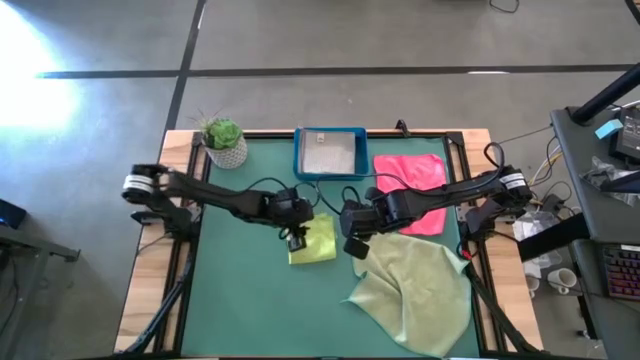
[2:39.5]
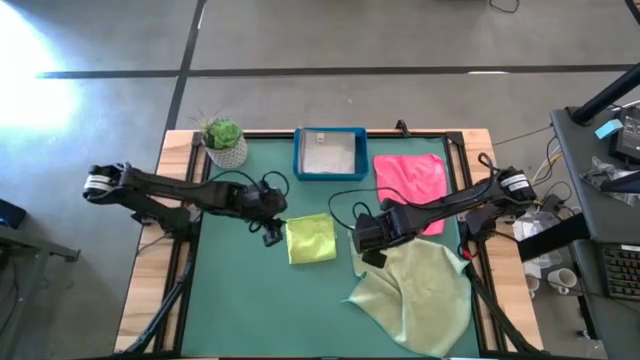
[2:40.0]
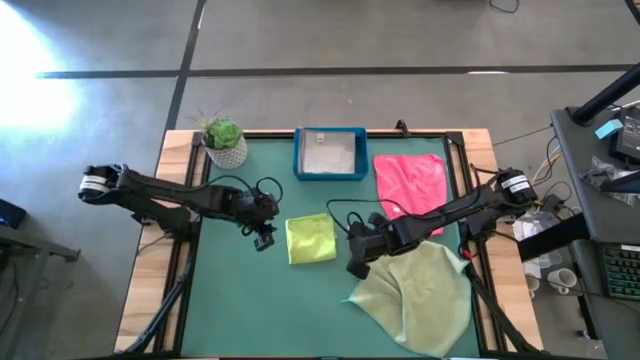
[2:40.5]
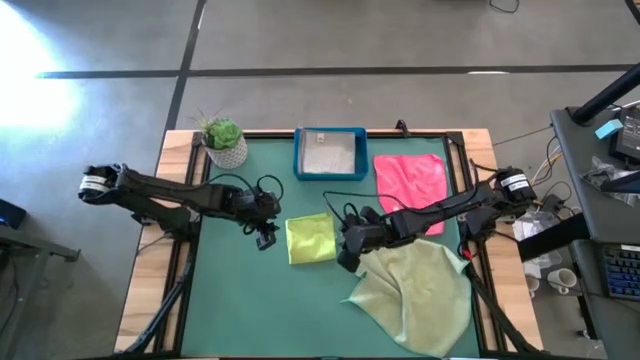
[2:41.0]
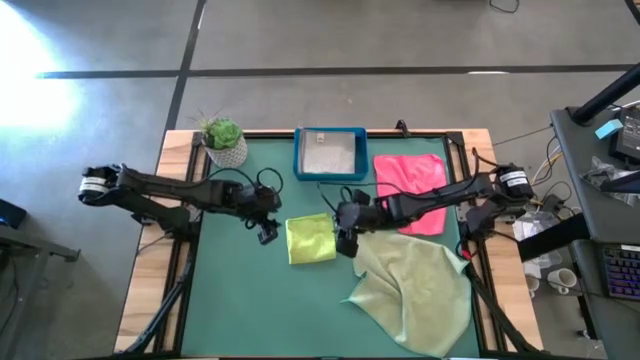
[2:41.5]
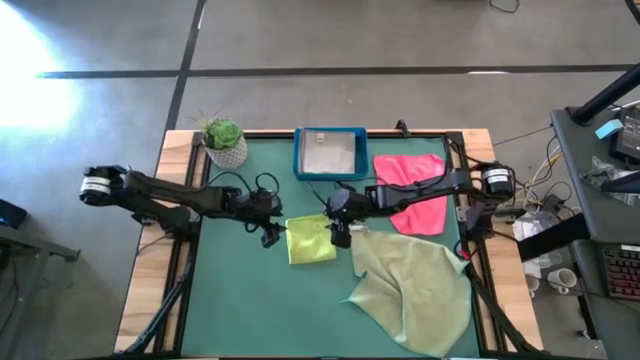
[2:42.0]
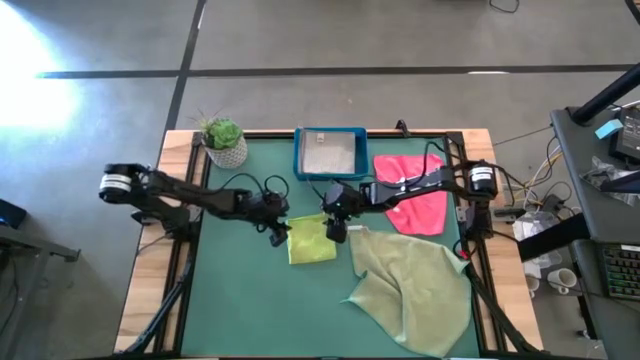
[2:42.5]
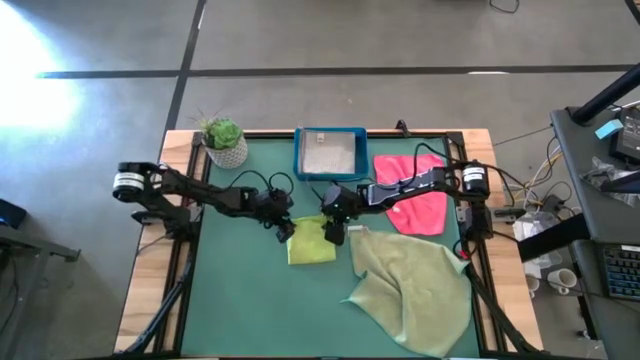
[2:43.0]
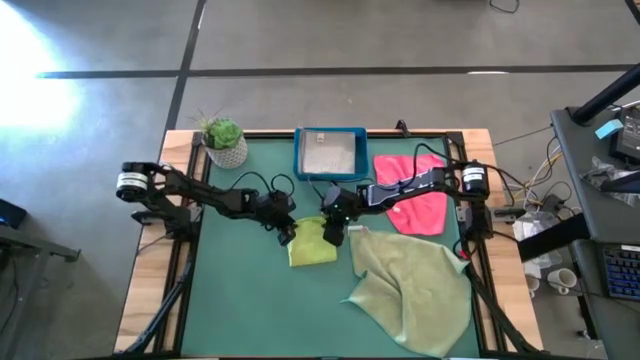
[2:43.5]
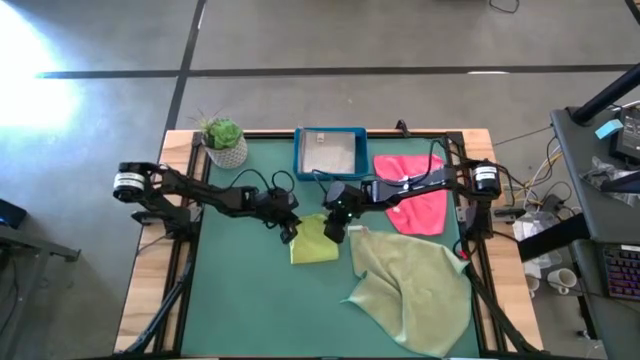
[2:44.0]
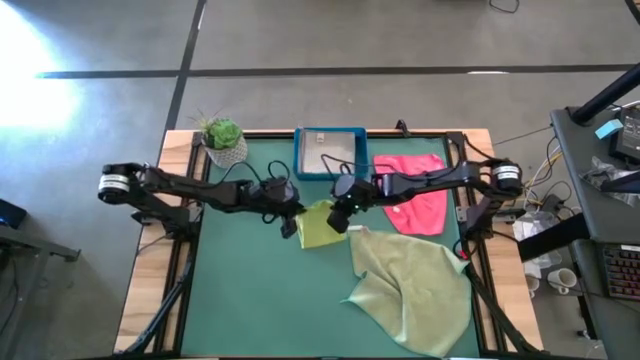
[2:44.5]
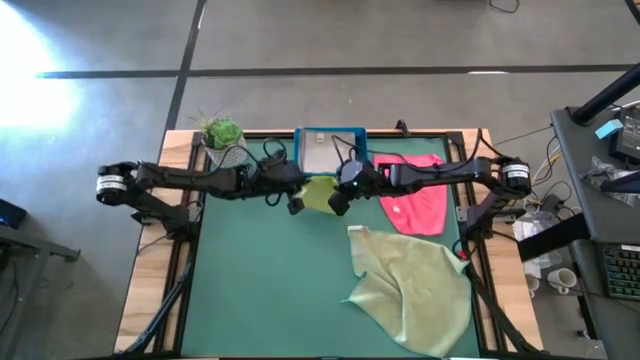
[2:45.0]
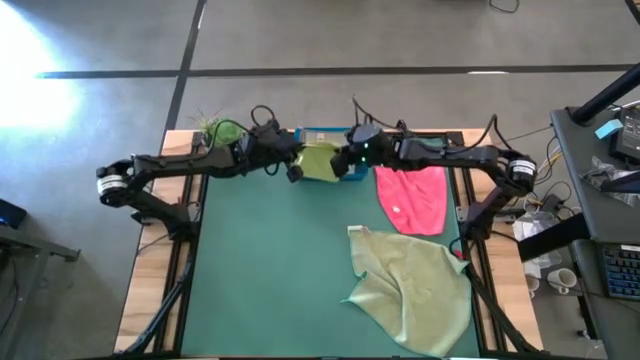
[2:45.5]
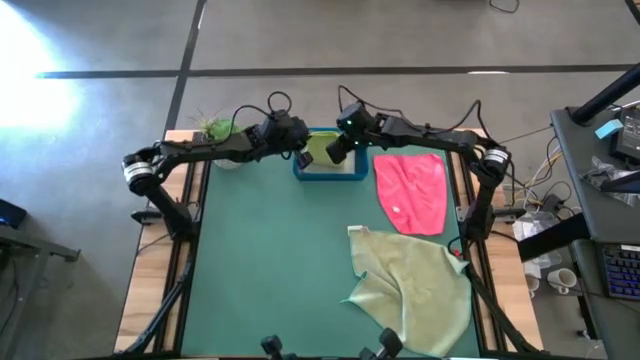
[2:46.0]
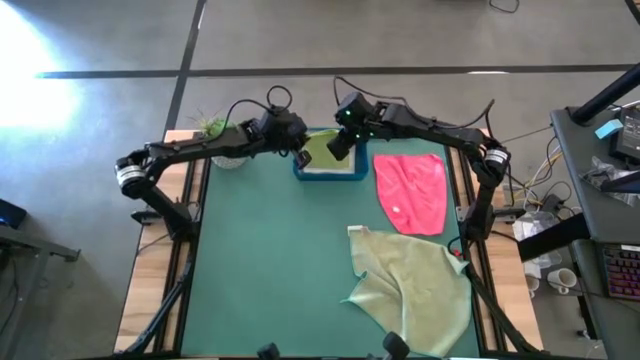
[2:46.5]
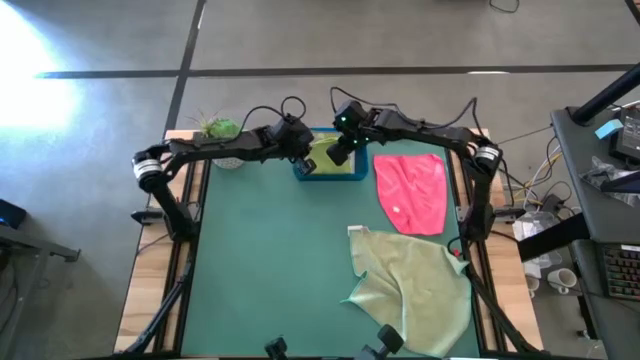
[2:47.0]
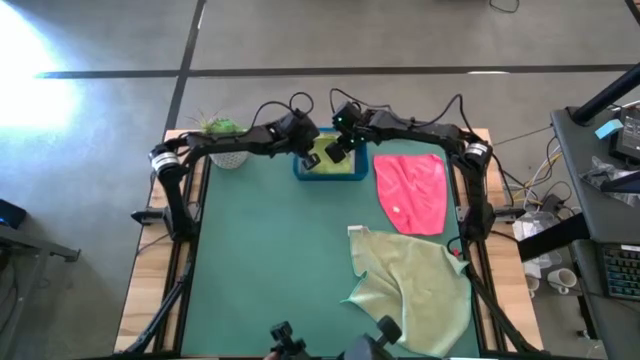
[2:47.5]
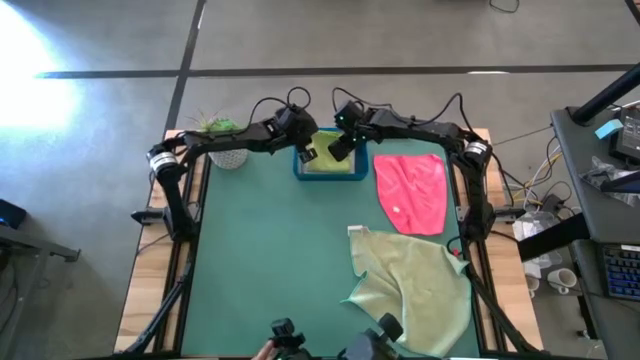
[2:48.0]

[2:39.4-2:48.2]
Task: Fold microfiber towels
Put the green microfiber cloth into the blue bin

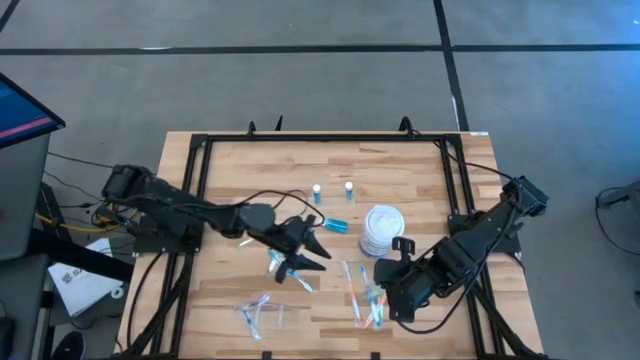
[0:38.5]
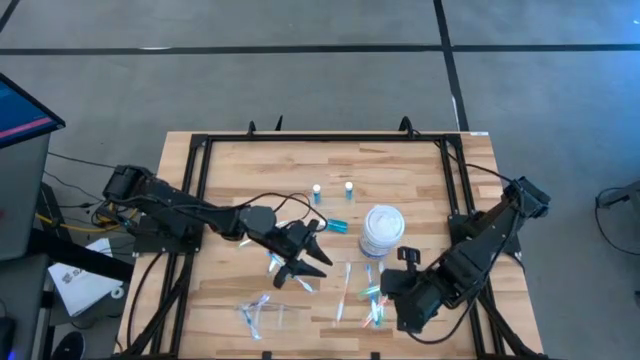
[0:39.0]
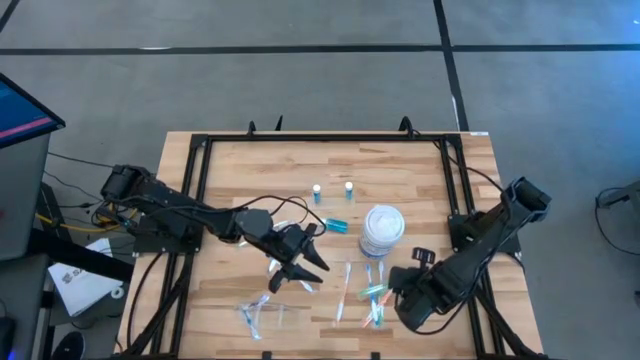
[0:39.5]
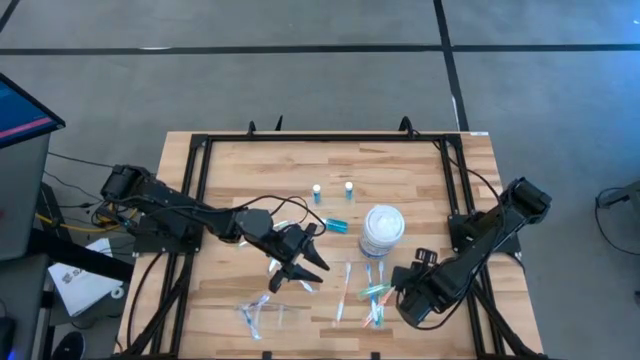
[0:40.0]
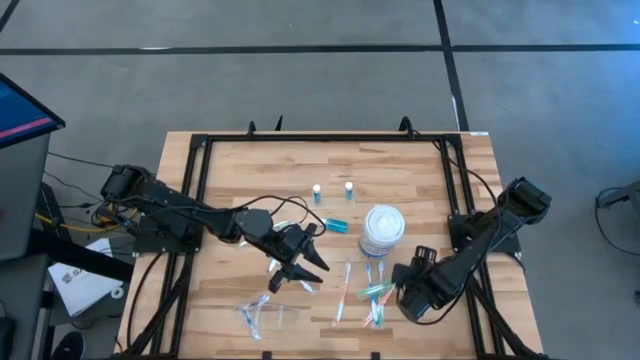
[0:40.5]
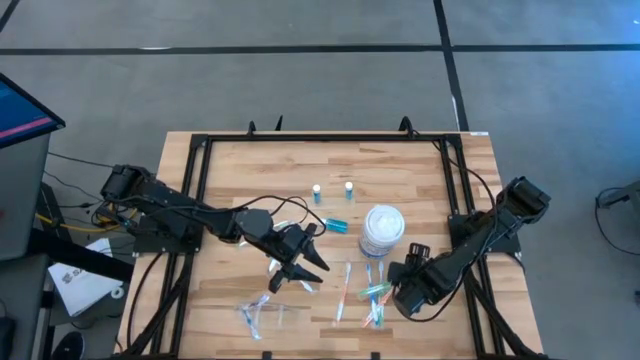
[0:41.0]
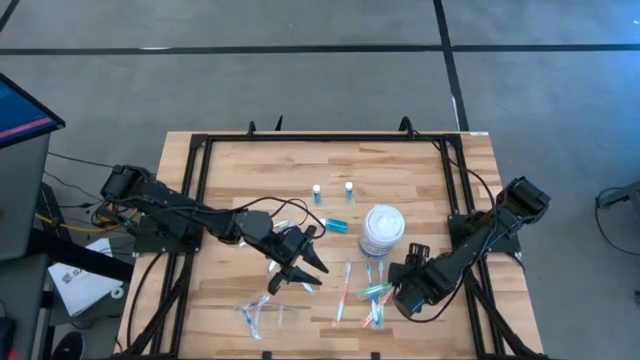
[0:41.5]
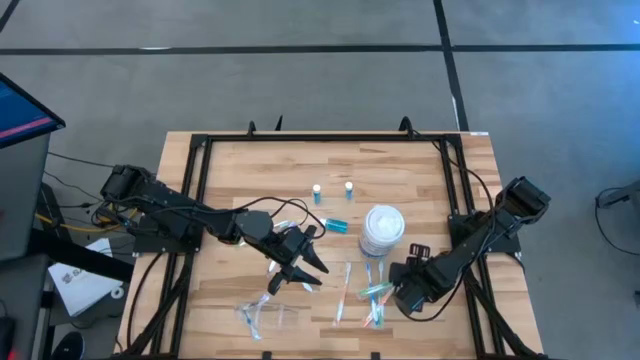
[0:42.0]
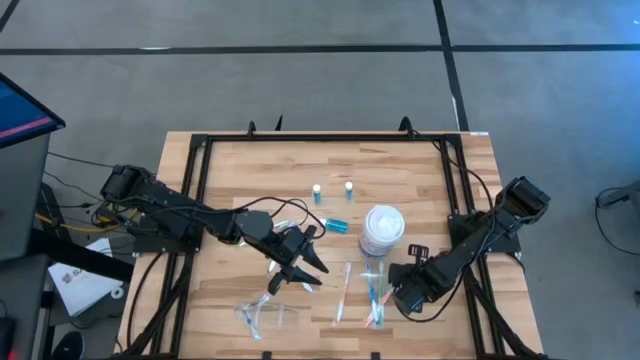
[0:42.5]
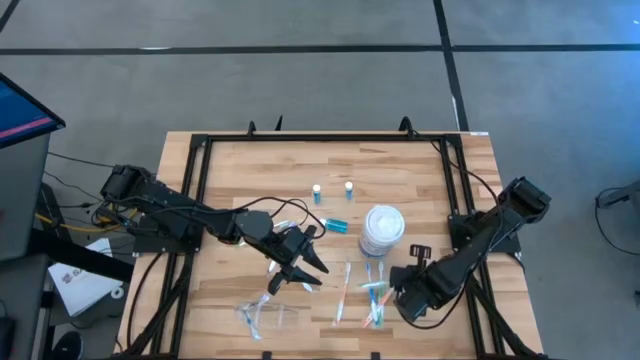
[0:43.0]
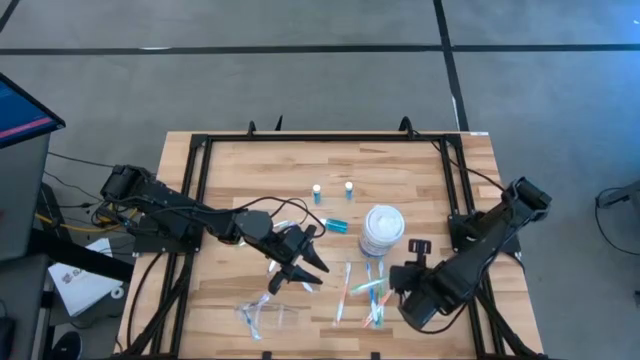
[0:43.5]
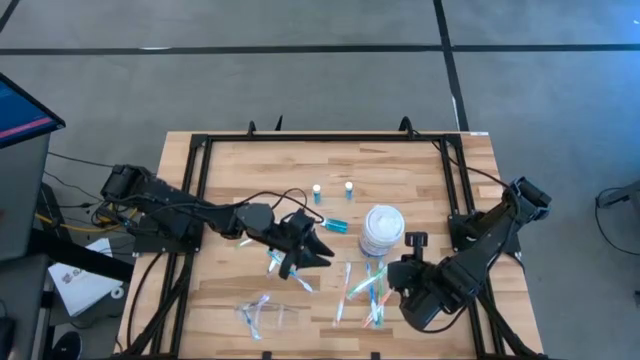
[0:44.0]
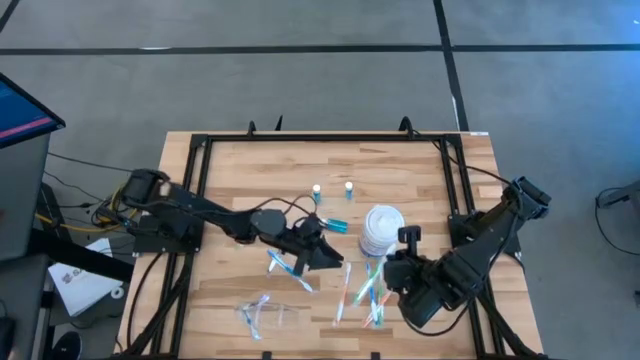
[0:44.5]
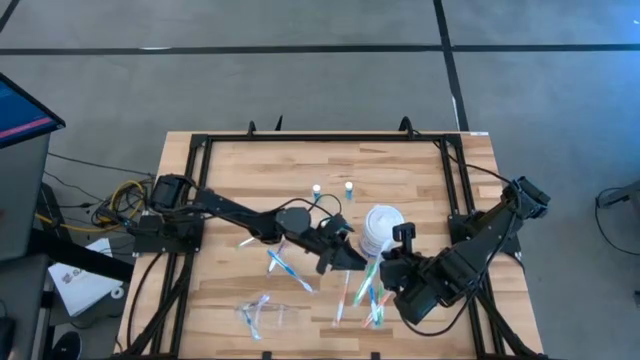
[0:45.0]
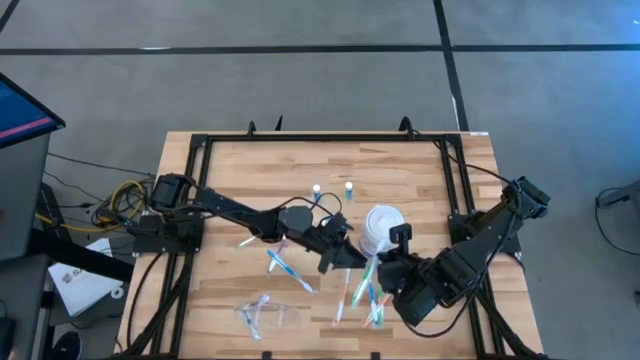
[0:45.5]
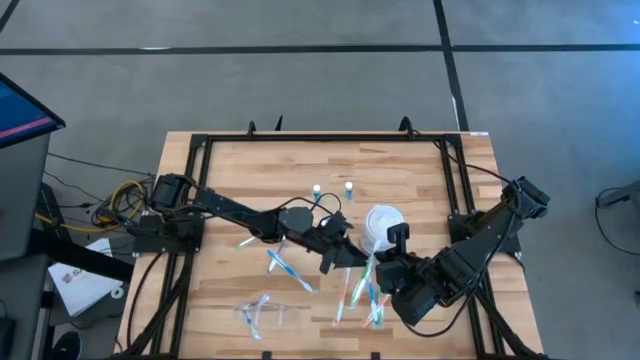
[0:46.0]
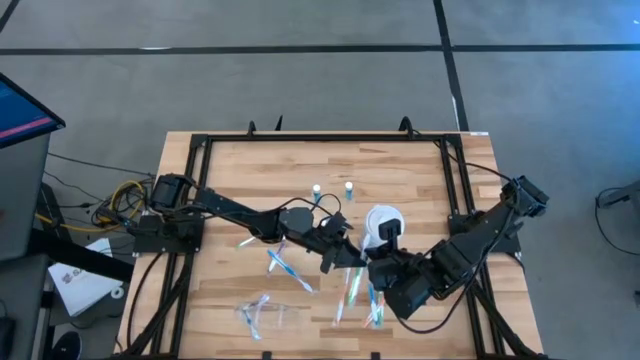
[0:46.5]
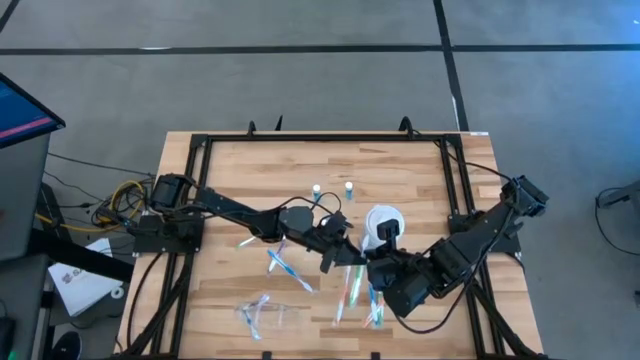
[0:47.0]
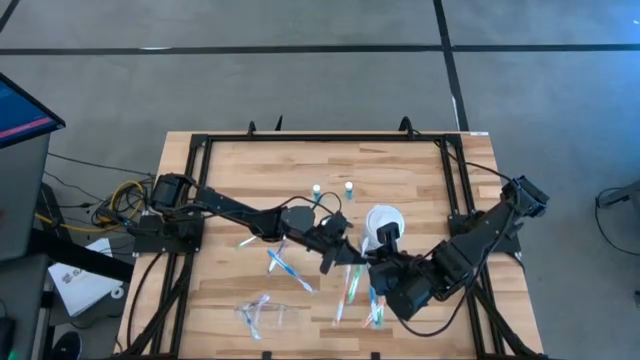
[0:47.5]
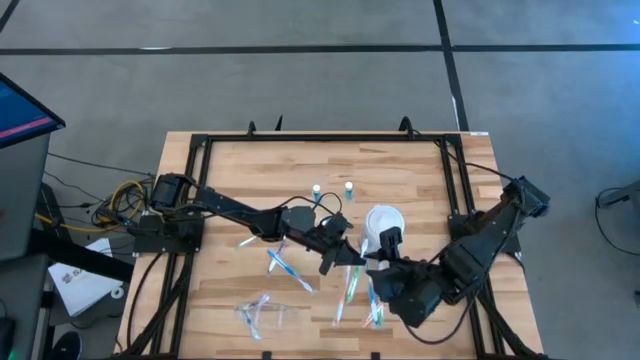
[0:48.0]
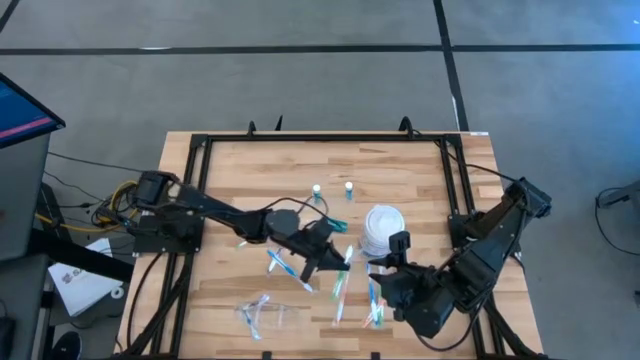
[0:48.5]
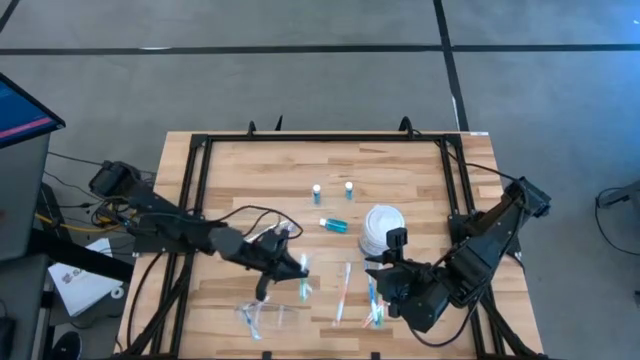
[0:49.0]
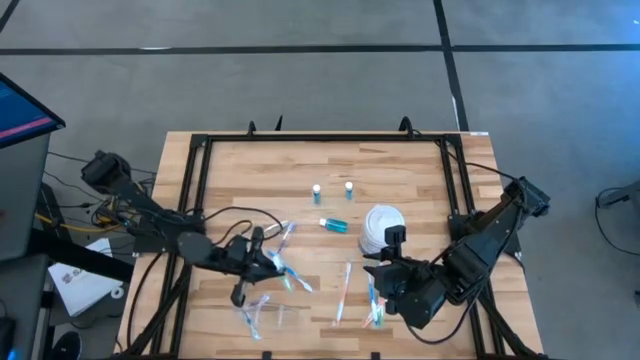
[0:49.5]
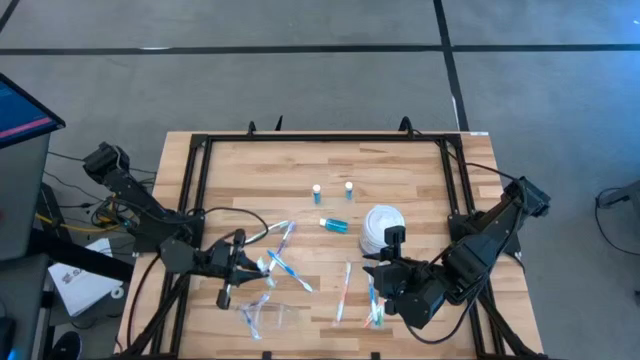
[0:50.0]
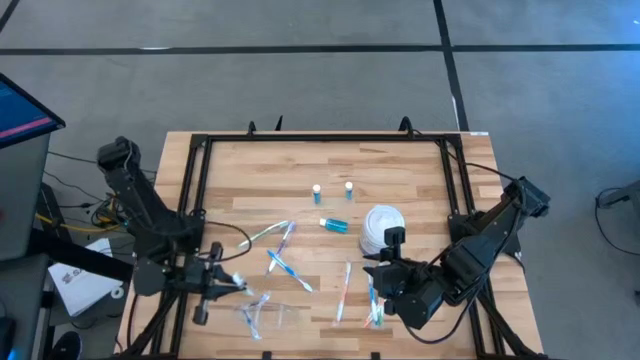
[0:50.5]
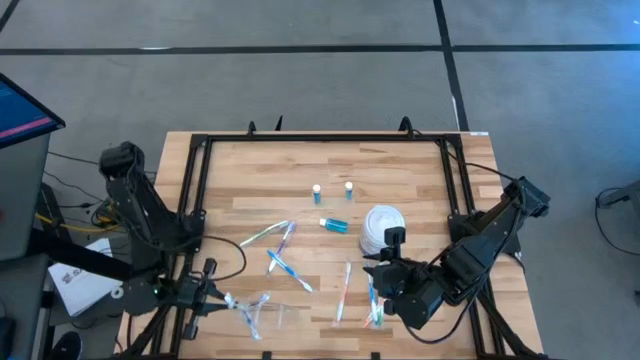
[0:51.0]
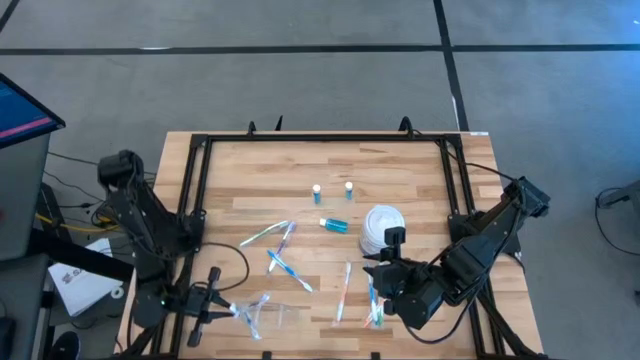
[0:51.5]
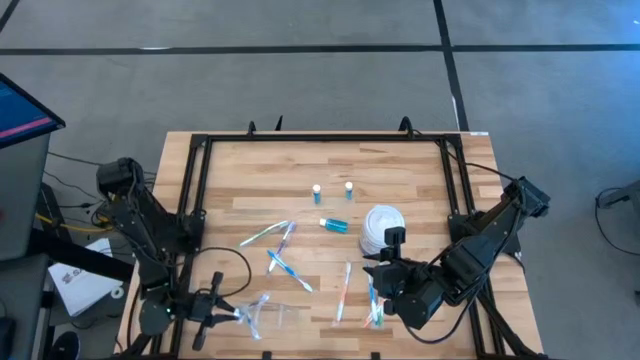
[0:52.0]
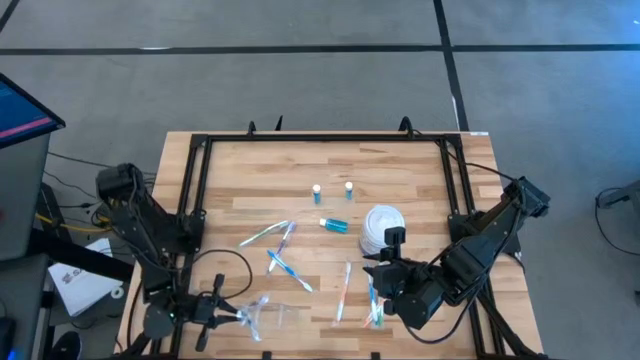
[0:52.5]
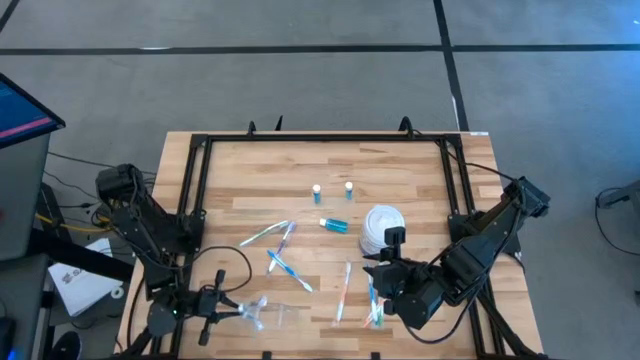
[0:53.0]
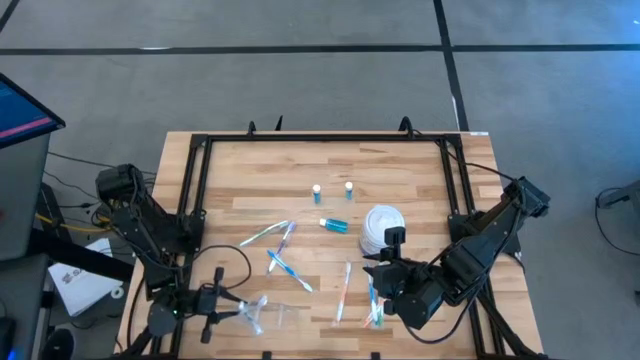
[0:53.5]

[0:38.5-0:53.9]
Task: Pick & Place toothbrushing station
Put the right green toothbrush into the transparent organizer
